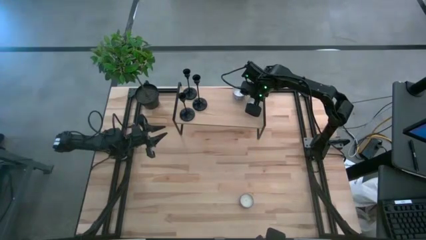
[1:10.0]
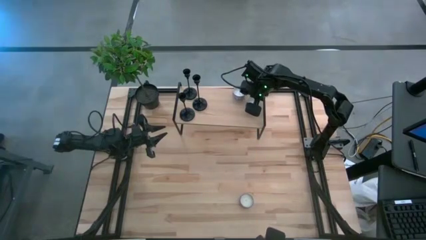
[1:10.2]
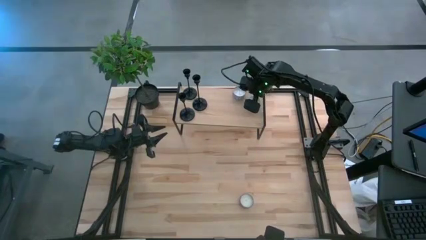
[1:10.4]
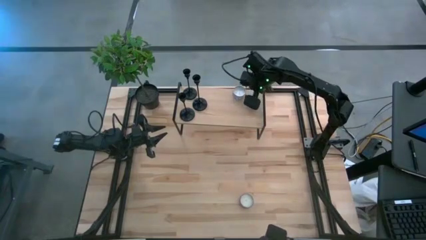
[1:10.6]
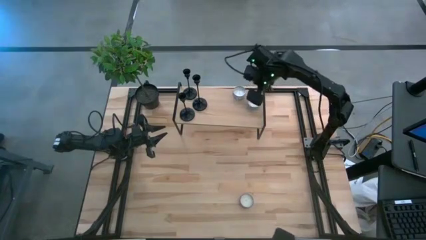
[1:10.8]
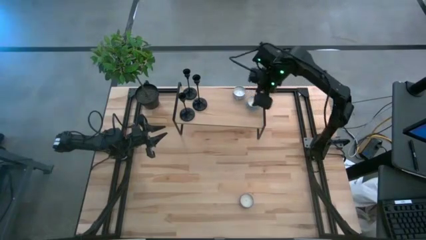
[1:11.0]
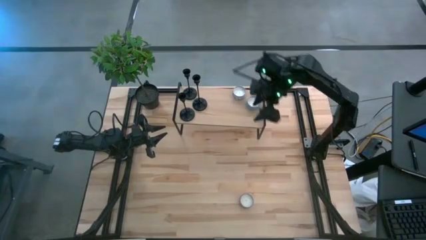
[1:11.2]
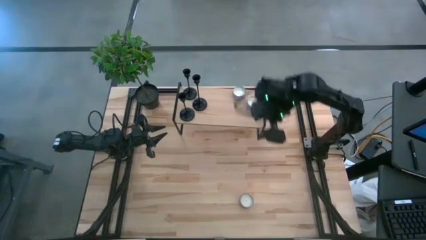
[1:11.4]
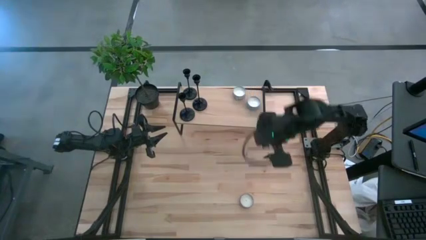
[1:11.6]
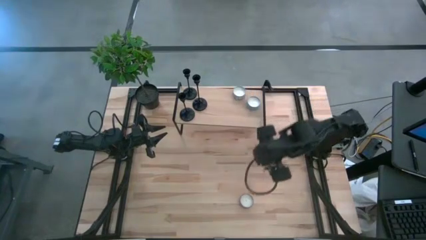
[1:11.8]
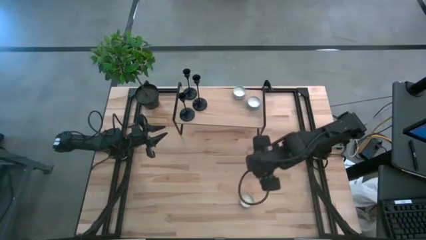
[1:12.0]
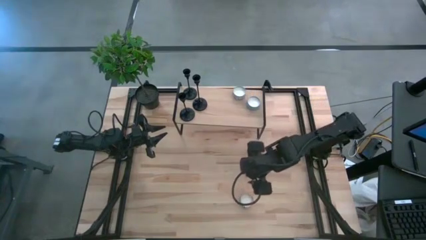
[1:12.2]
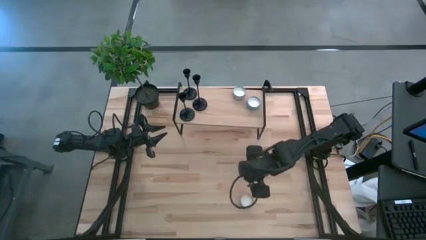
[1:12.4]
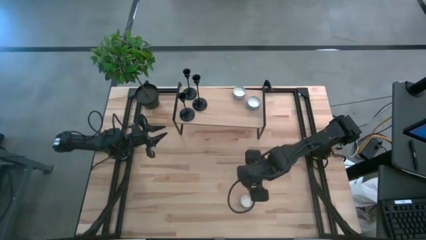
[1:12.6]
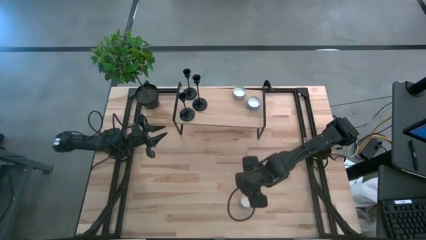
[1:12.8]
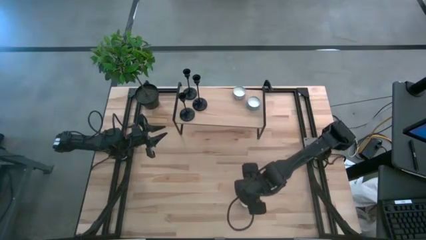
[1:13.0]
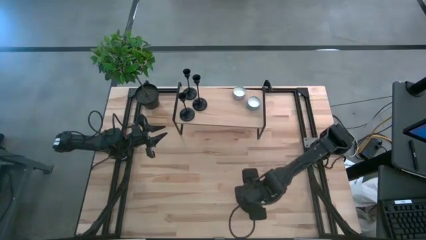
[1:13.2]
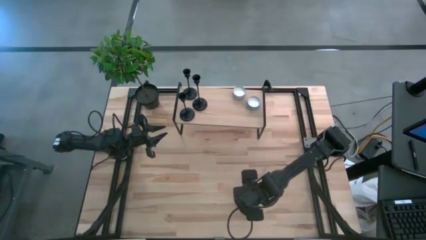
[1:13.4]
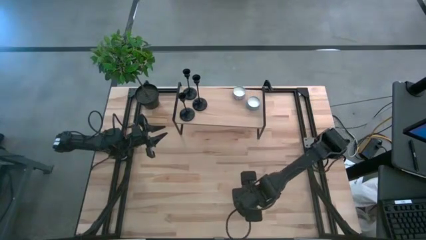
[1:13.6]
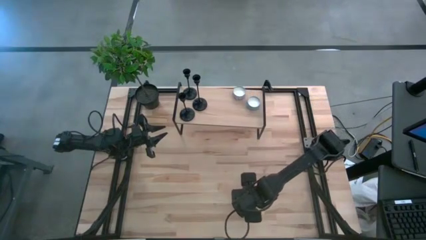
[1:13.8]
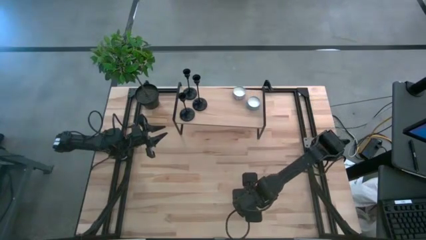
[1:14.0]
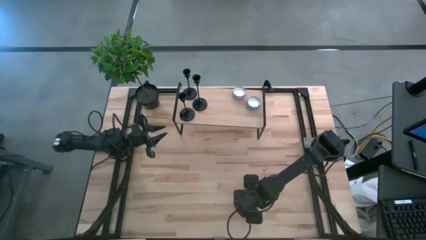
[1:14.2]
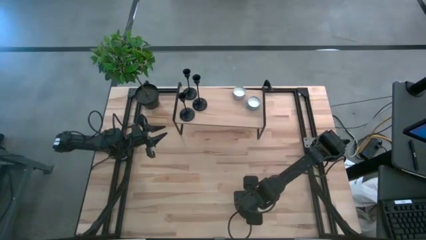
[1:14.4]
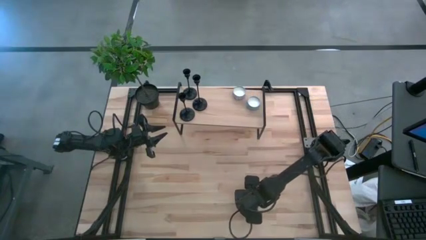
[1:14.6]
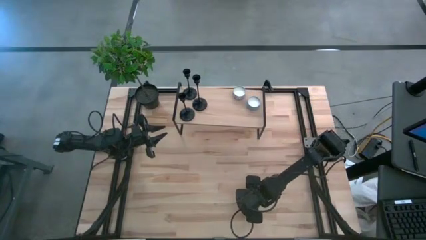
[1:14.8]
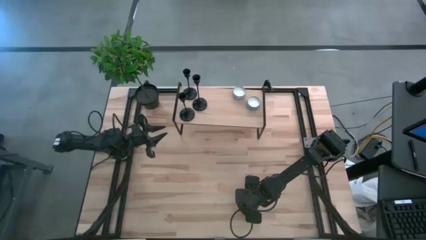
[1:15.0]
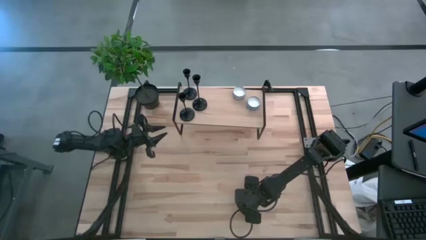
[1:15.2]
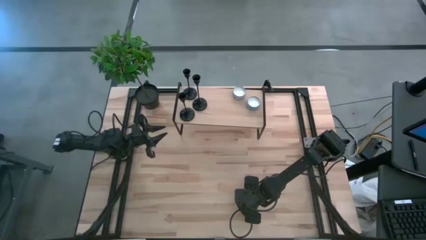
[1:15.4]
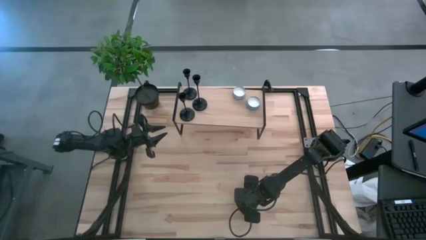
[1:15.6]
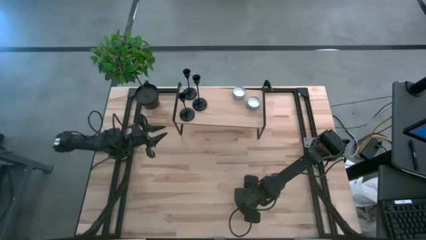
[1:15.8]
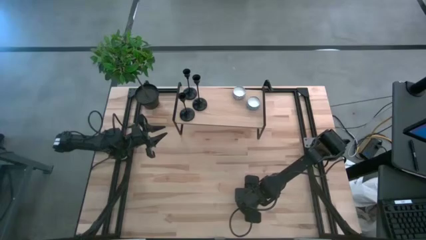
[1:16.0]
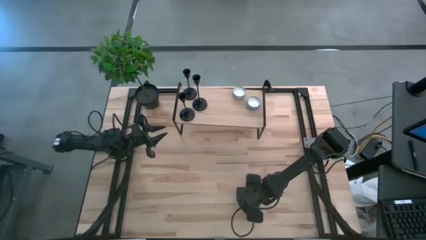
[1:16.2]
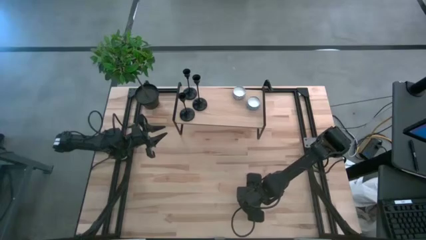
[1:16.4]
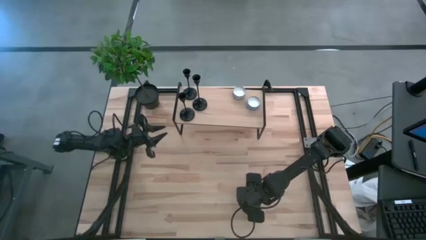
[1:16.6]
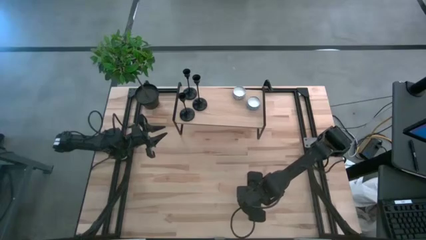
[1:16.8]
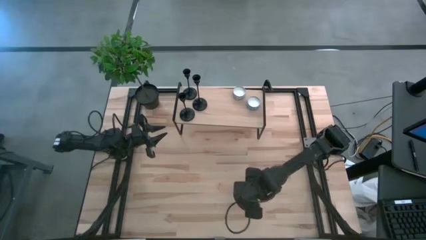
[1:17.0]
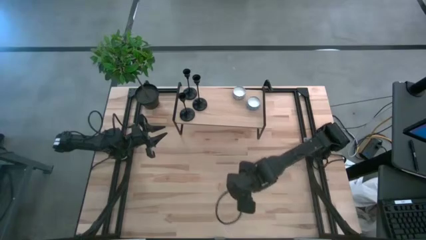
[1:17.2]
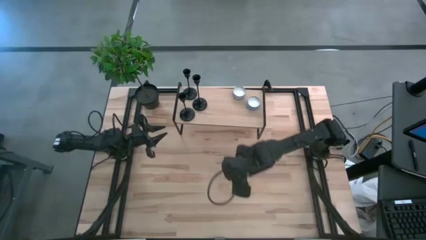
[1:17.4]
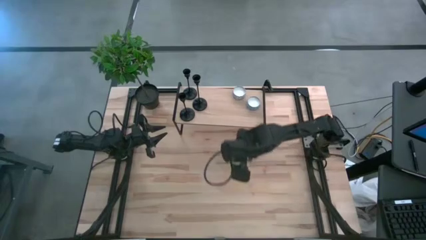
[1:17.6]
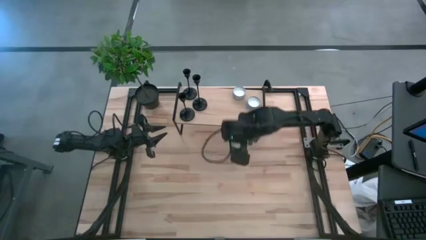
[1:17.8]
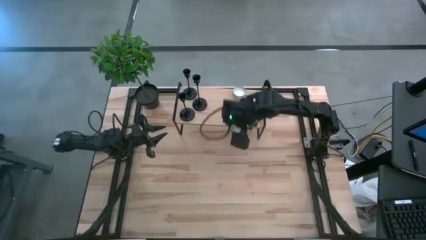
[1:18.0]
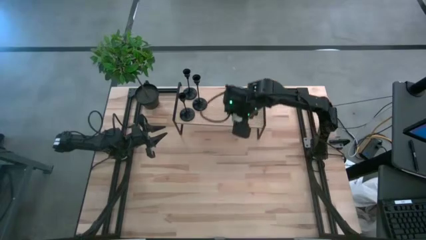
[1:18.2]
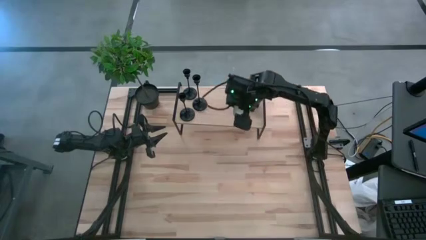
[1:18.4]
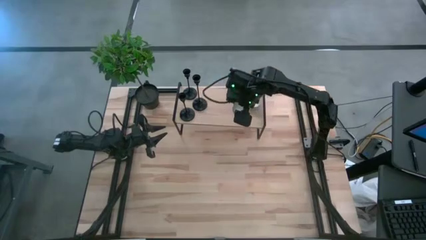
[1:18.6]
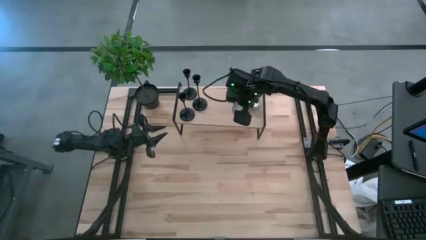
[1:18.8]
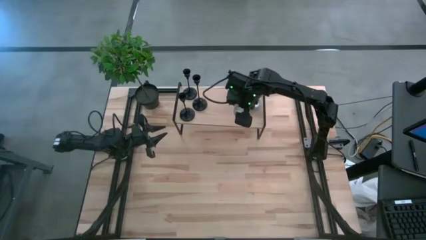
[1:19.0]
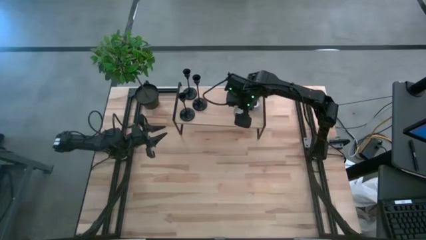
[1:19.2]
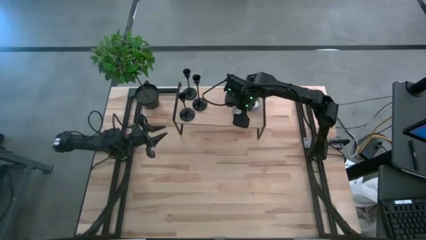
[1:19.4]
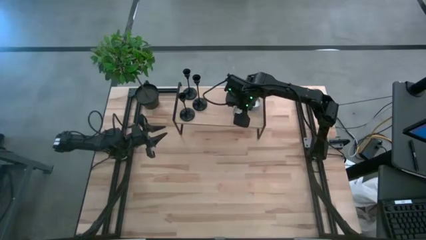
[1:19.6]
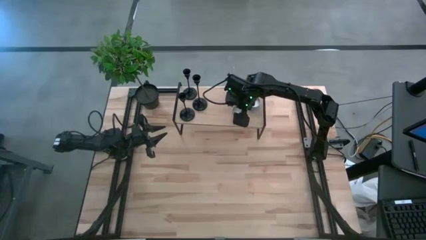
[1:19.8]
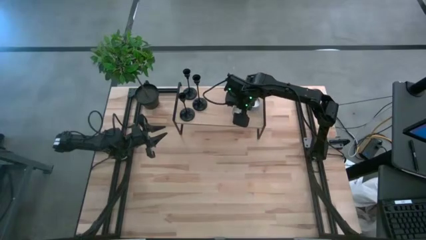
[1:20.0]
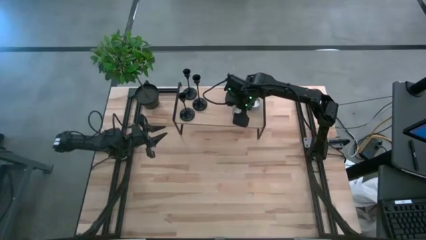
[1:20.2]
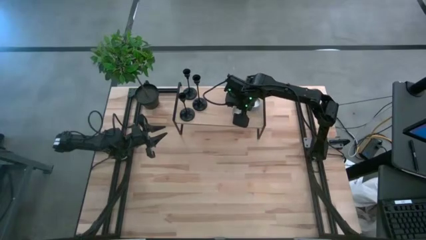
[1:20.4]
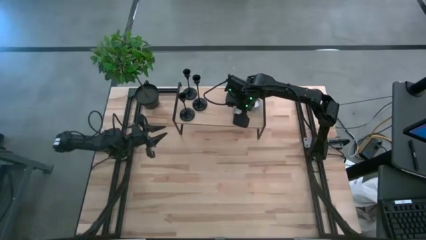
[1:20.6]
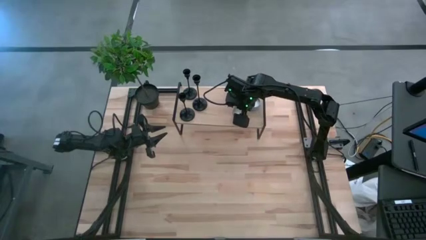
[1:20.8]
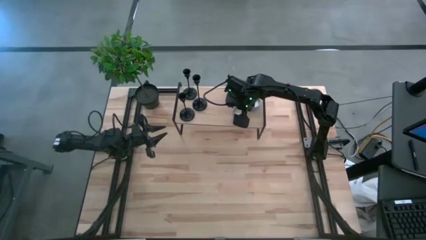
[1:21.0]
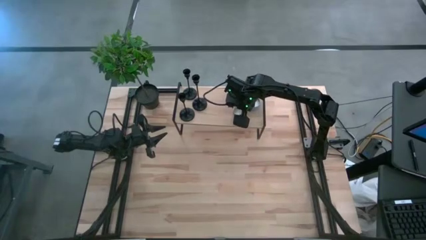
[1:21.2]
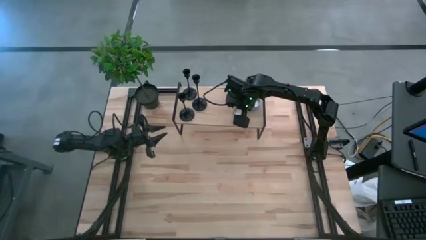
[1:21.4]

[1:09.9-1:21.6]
Task: Pick & Place candle stick holders
Put the pink patterned scented candle on the shelf

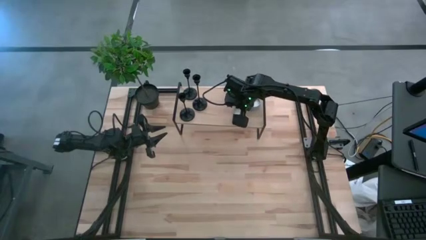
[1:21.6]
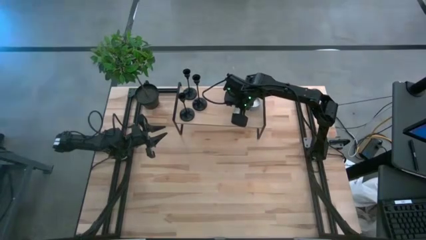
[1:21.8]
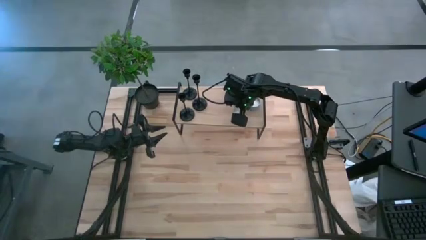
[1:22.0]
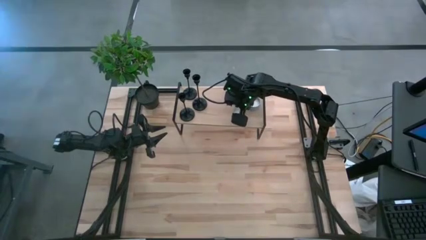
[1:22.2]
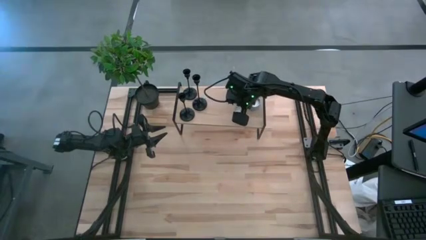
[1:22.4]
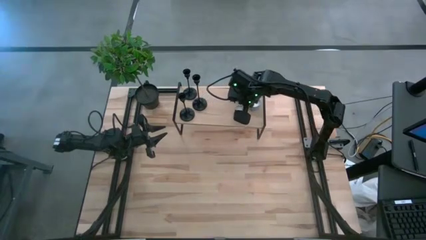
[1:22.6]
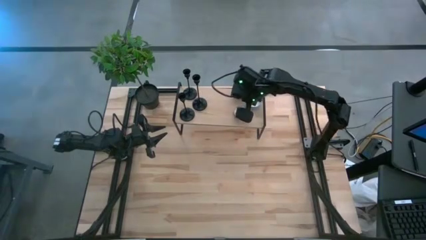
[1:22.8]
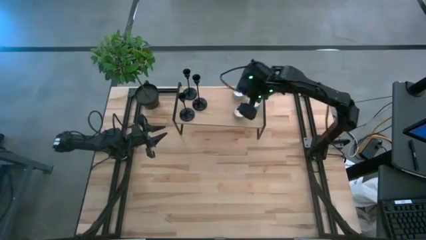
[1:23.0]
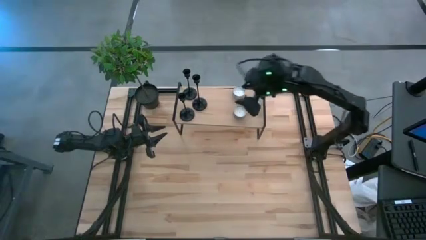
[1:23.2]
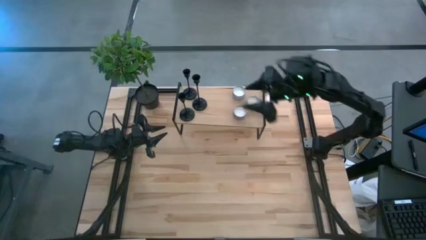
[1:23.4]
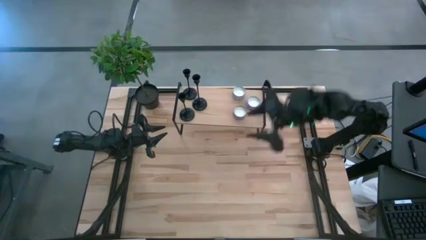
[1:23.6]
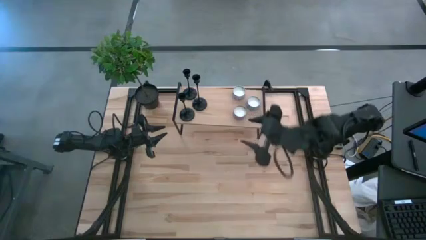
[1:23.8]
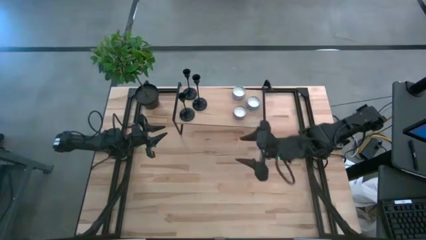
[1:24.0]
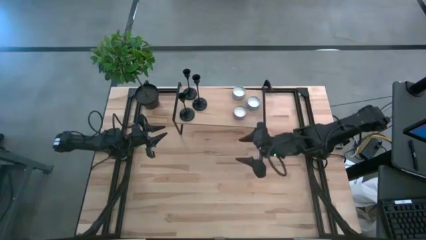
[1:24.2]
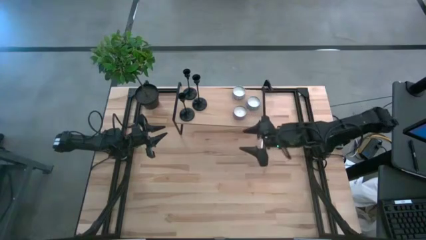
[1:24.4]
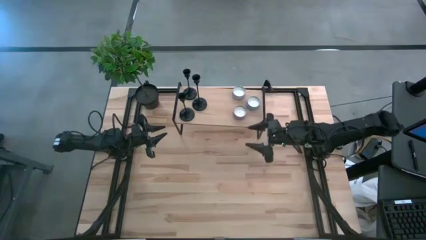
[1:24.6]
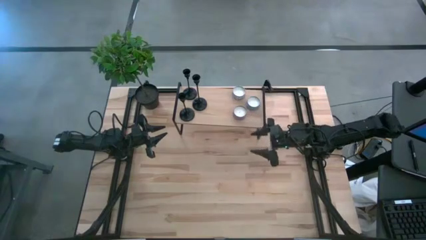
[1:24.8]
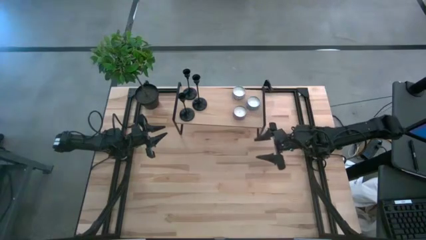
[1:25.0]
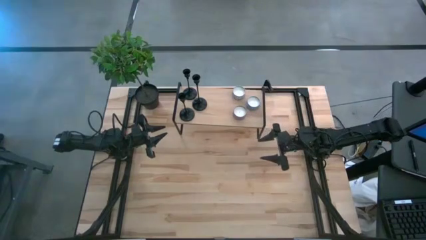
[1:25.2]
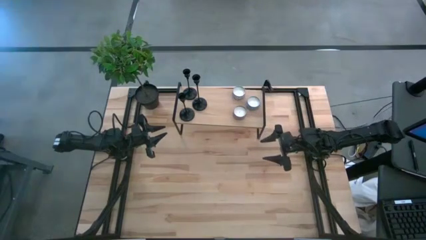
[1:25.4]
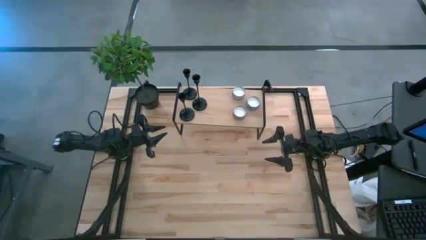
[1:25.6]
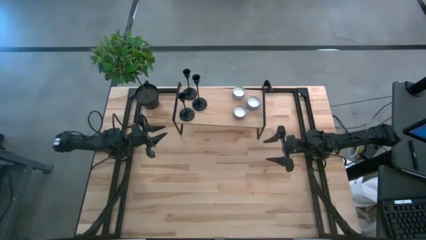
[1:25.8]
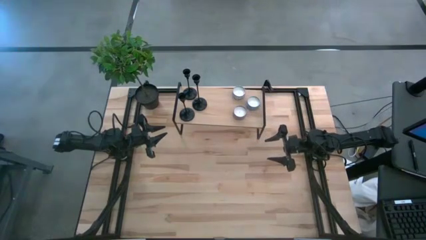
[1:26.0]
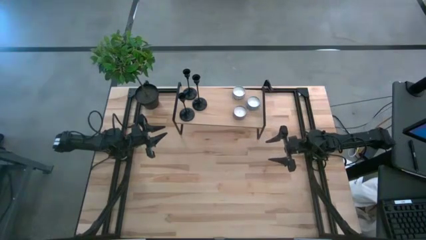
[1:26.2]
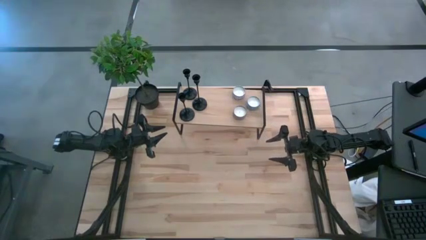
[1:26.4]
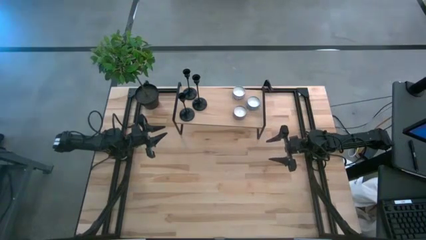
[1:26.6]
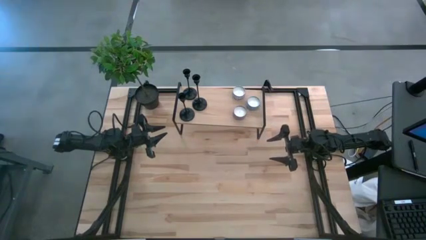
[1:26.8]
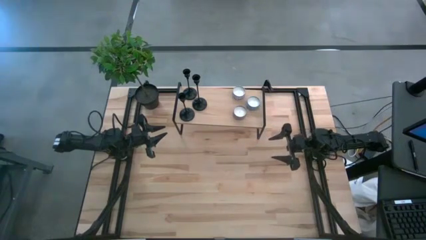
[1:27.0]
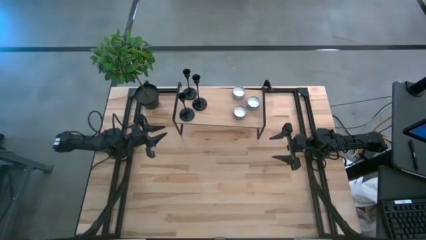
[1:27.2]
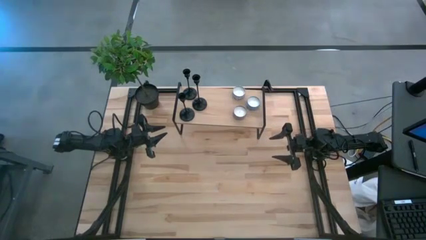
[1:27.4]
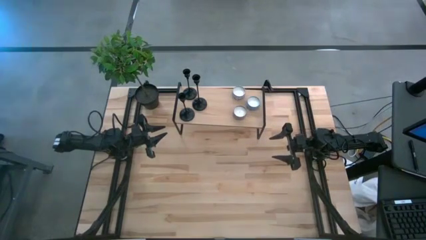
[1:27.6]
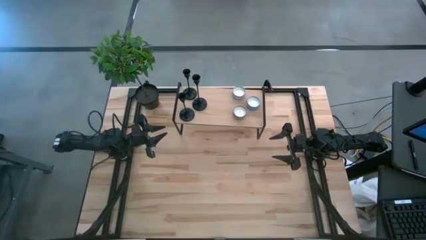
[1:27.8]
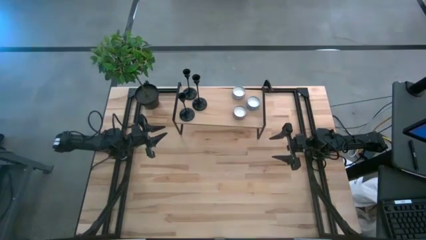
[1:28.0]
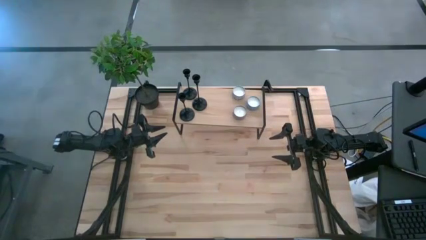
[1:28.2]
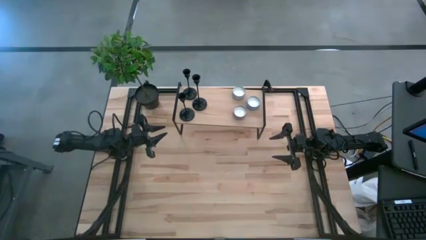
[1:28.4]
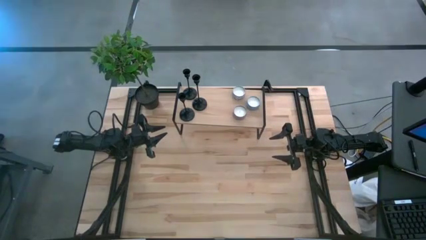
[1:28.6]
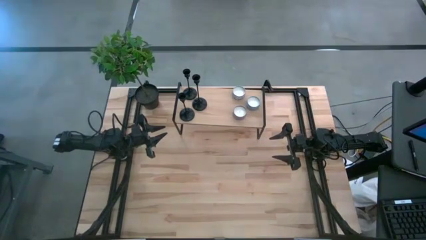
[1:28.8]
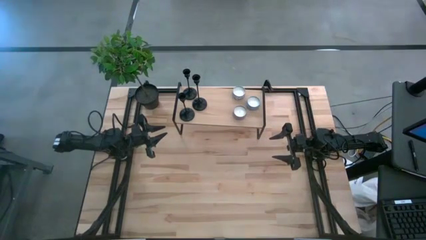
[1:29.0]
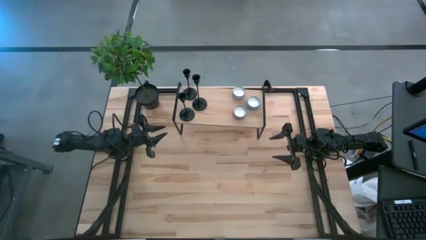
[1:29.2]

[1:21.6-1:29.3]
Return to Home Position
